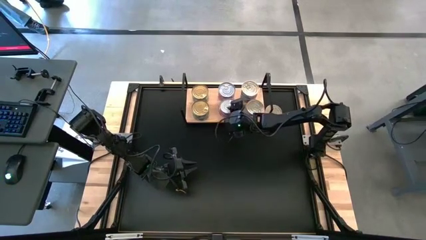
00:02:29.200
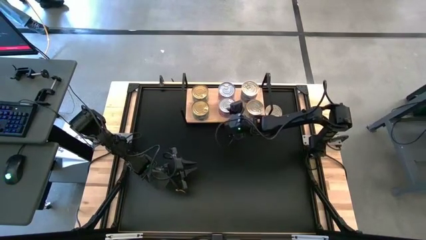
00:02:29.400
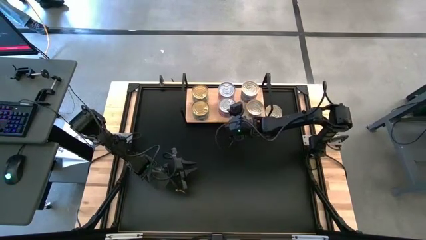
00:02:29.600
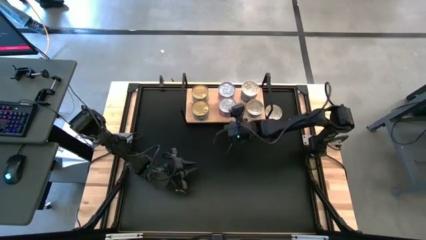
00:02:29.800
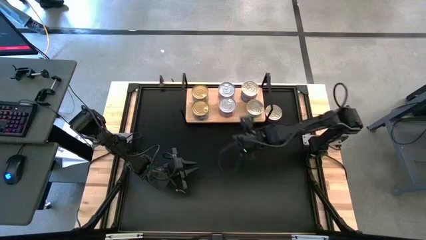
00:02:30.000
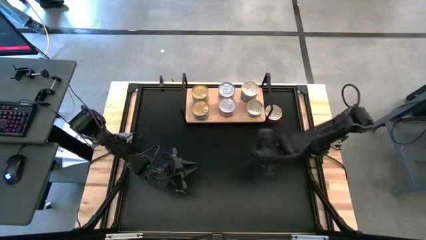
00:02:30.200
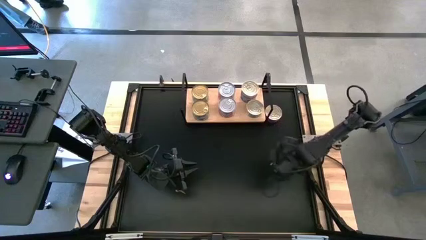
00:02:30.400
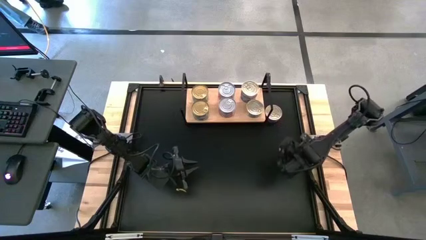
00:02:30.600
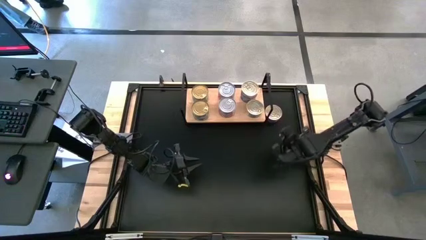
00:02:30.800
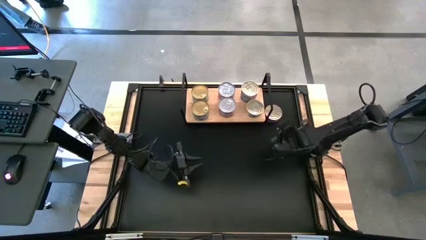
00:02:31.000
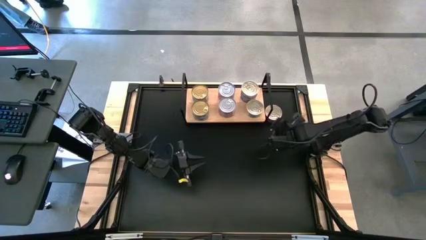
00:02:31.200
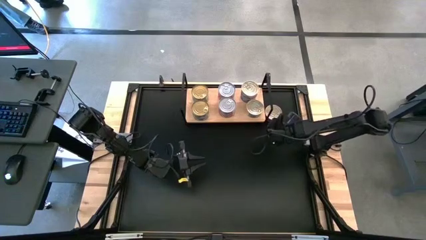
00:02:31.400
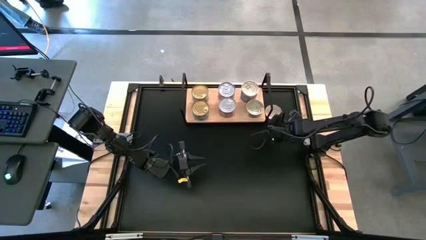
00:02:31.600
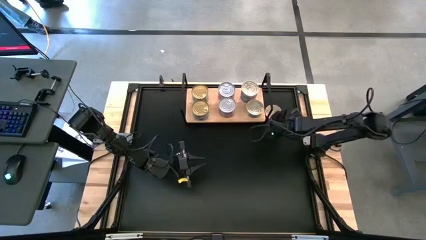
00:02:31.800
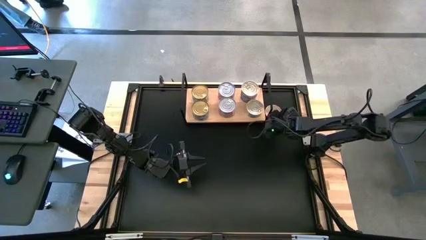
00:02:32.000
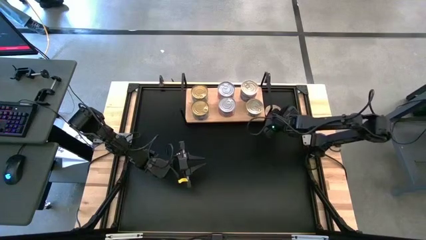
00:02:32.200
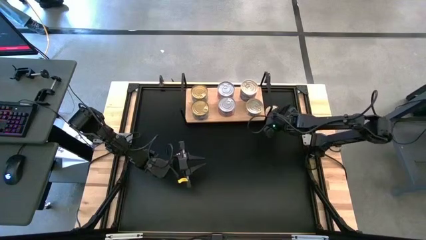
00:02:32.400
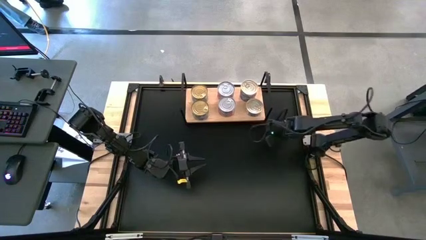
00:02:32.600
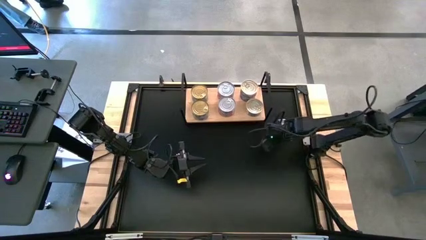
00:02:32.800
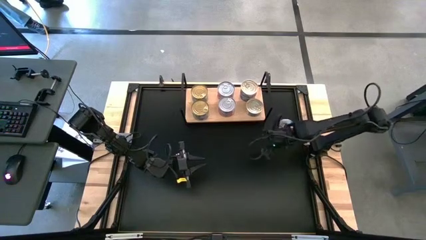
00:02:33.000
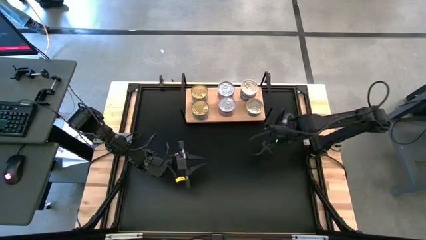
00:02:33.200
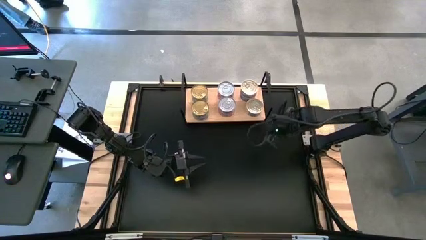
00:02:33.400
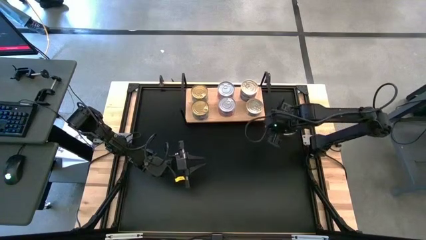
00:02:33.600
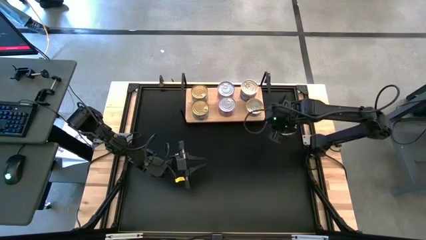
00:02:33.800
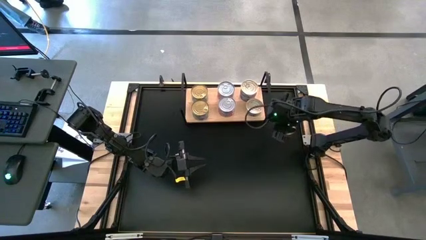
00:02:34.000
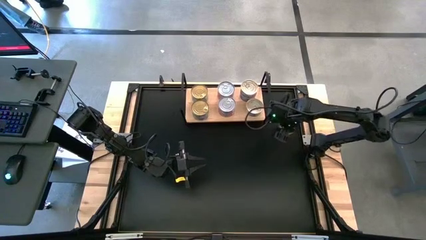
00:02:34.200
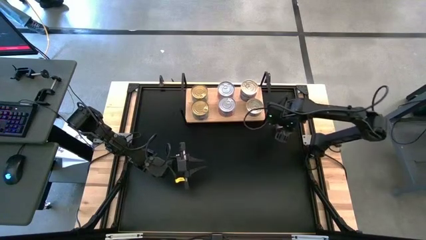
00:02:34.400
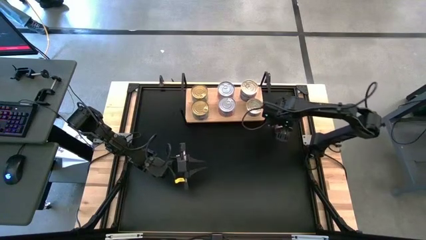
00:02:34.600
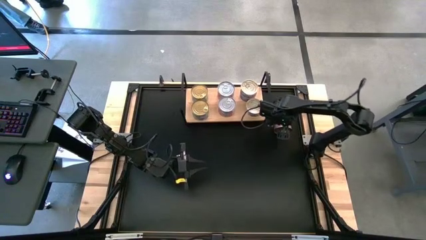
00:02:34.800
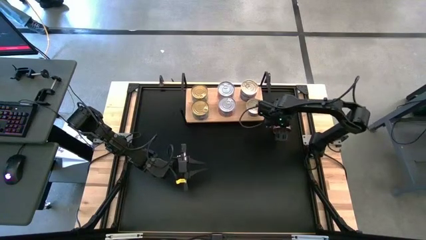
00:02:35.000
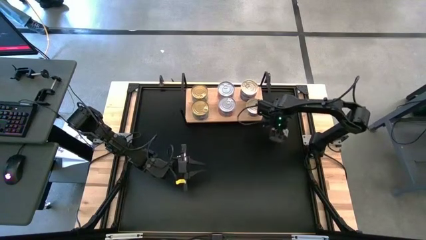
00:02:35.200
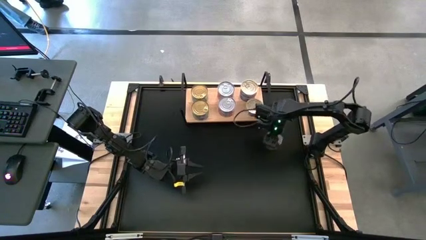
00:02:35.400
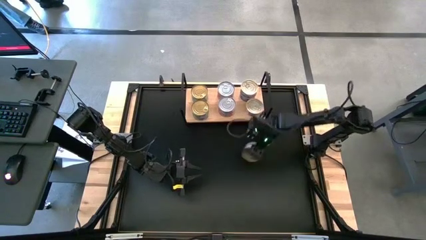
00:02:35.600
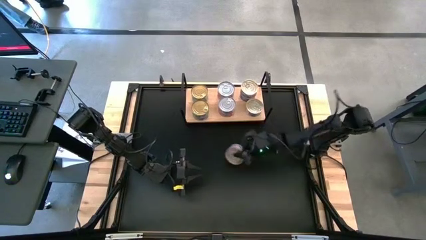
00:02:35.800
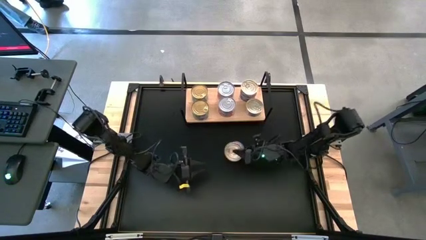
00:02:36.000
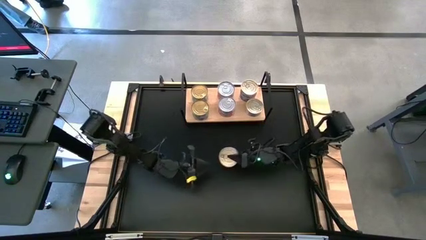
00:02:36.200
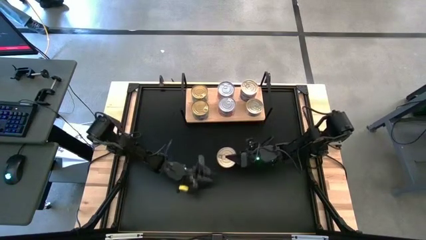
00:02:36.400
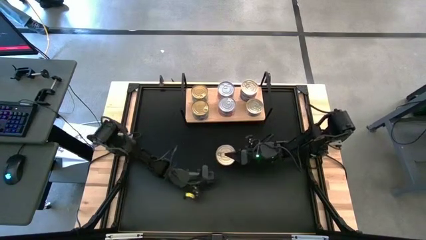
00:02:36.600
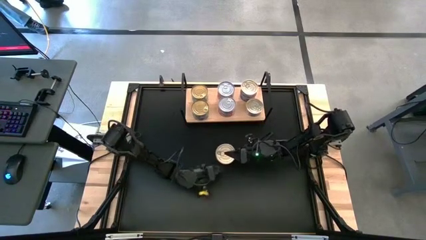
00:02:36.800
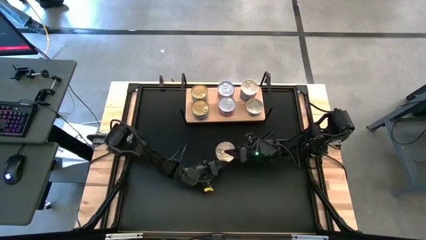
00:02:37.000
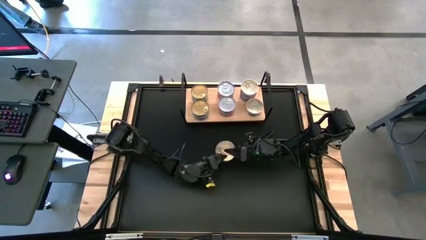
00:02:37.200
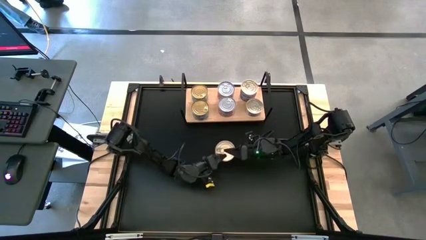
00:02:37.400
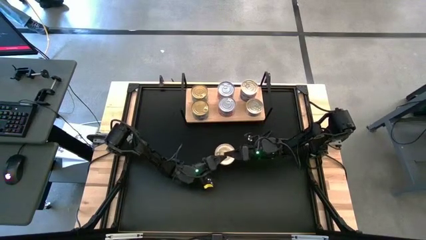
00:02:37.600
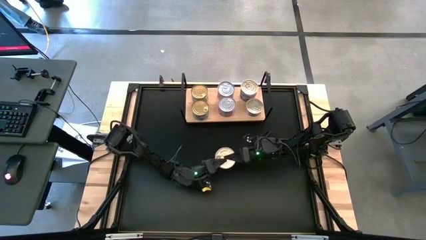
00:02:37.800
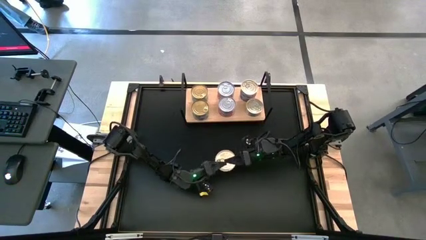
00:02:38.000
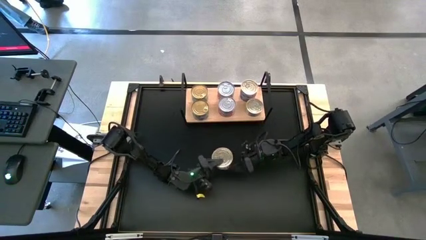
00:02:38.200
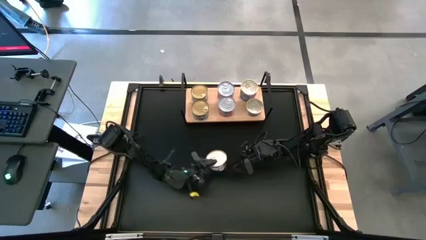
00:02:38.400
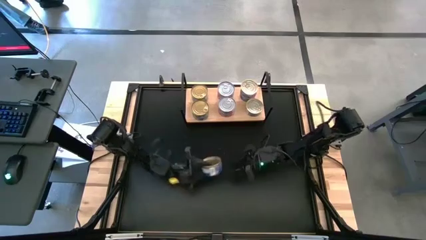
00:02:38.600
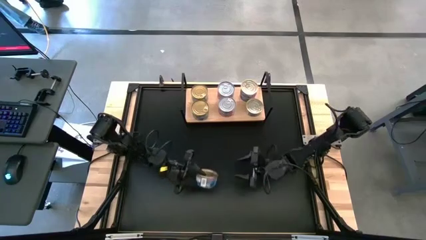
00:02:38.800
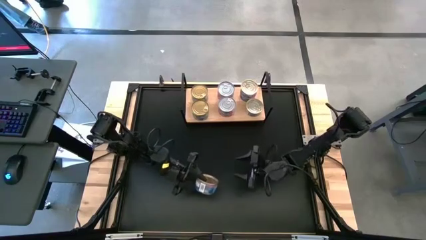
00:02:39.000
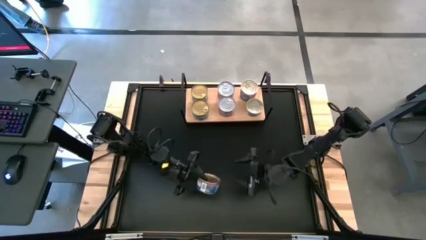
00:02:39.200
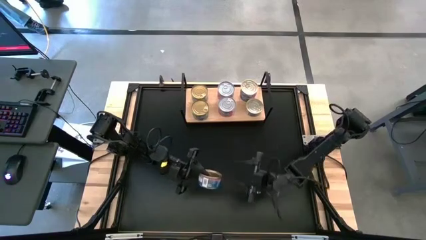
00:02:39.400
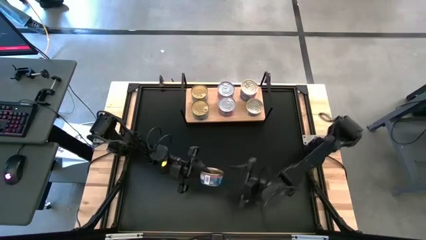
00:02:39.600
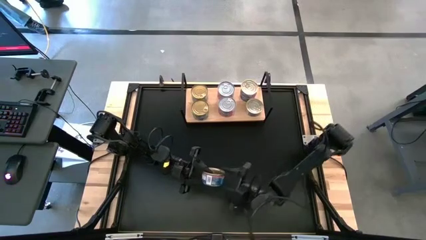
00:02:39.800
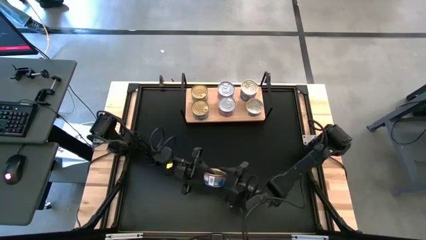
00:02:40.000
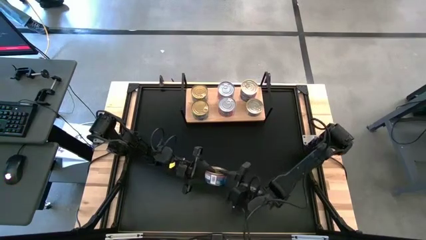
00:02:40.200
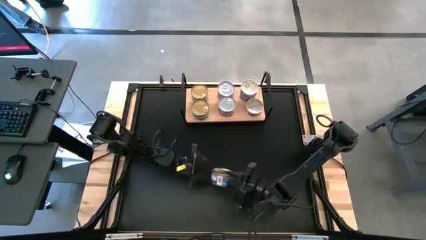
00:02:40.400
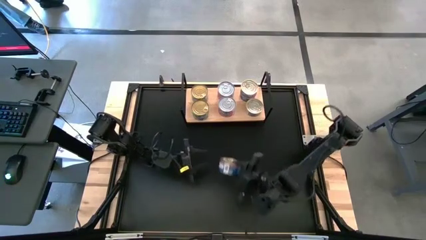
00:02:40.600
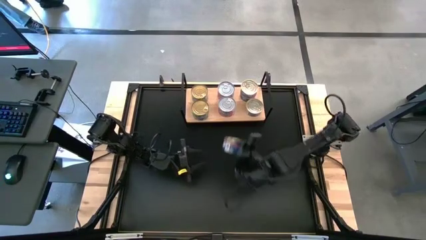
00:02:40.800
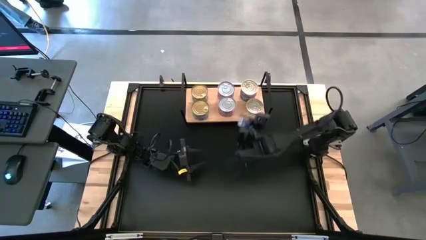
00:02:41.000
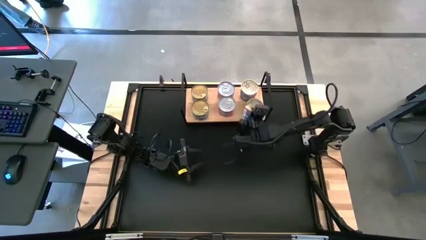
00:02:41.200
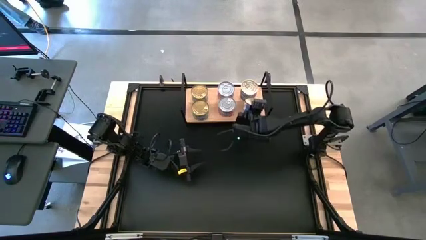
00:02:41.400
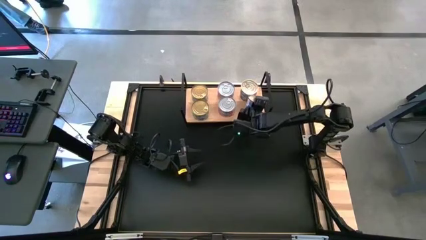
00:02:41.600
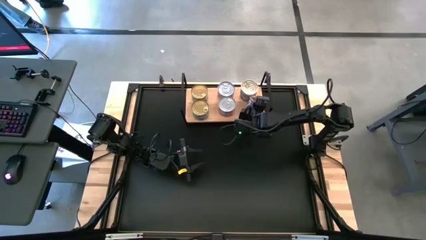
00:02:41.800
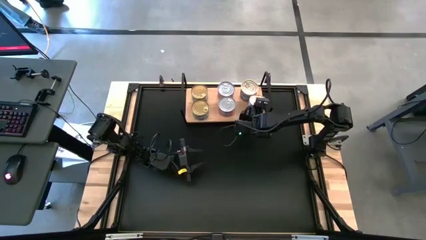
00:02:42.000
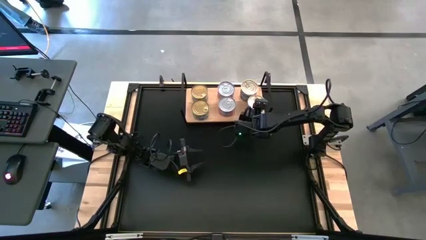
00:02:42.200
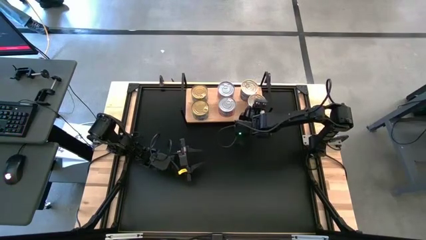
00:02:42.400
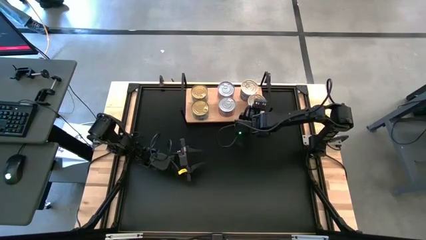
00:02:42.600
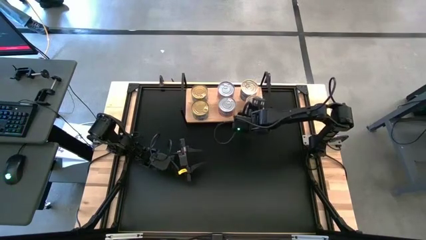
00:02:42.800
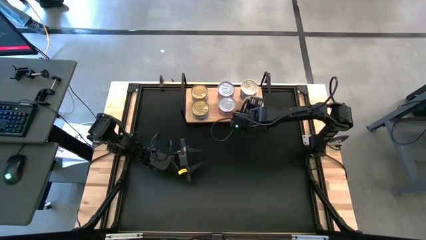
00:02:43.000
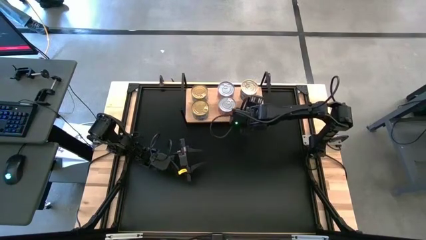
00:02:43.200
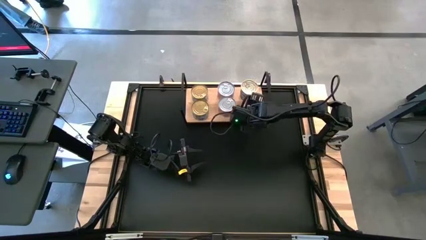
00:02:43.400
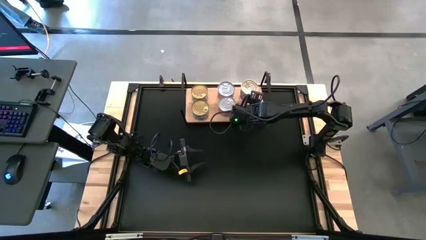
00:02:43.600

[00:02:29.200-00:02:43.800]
Task: Stack canned seafood by type on shelf
Stack the blue tuna can on top of the blue tuna can
